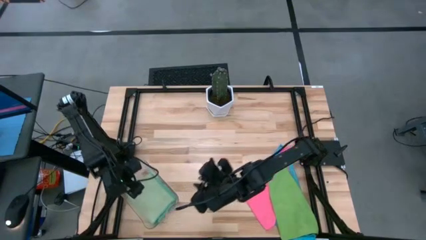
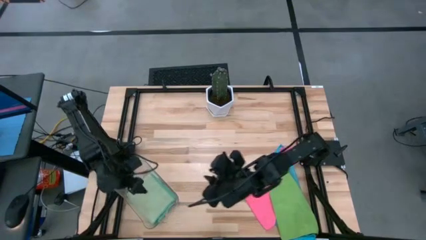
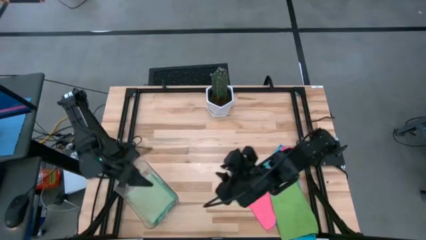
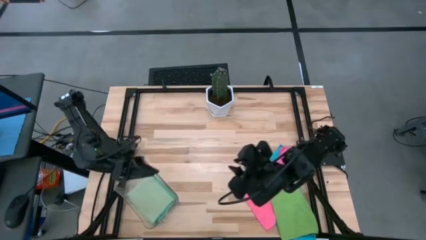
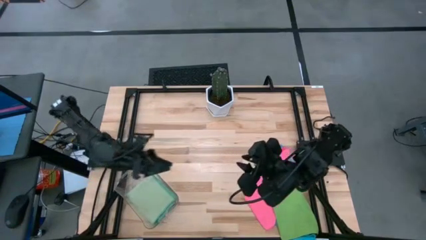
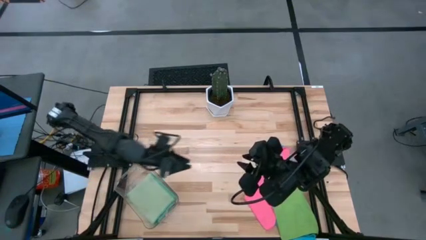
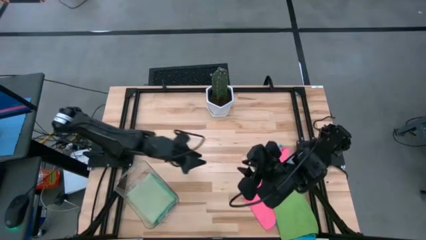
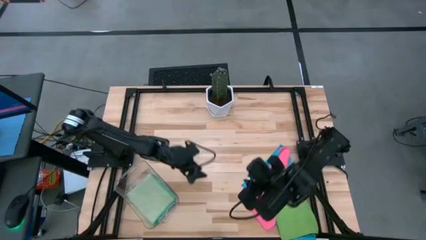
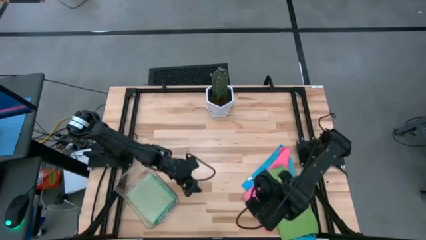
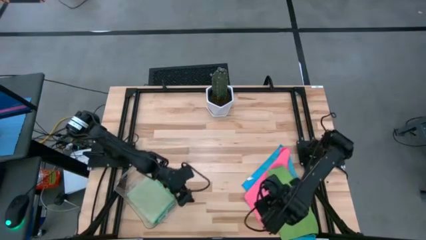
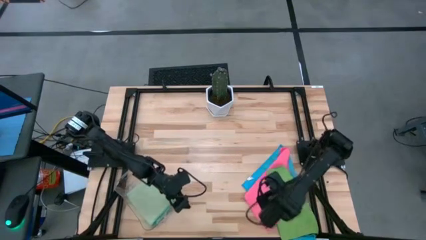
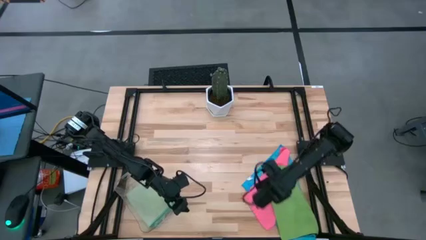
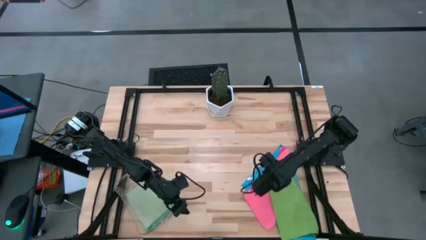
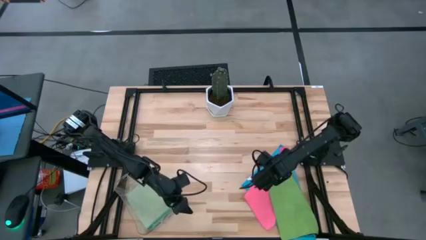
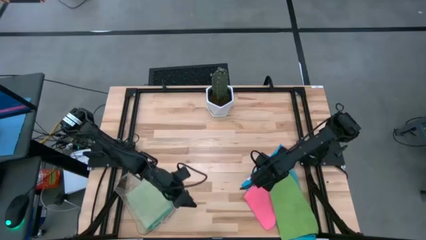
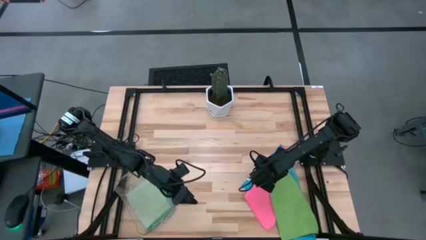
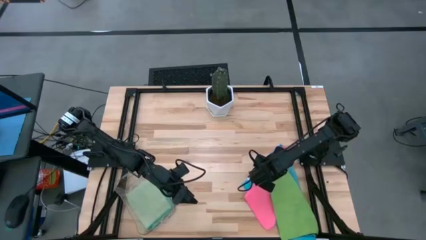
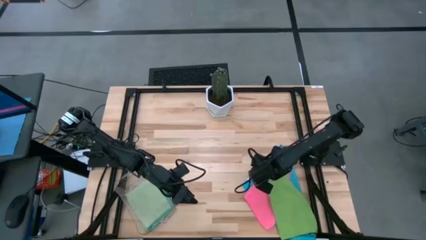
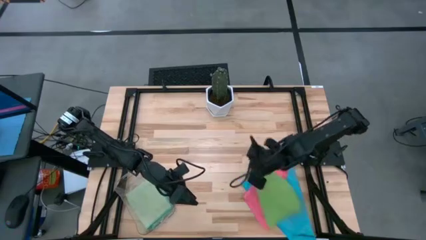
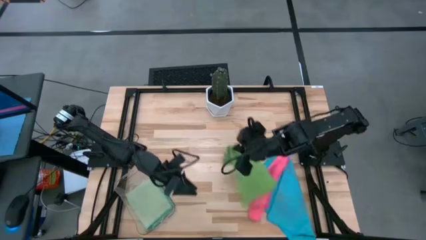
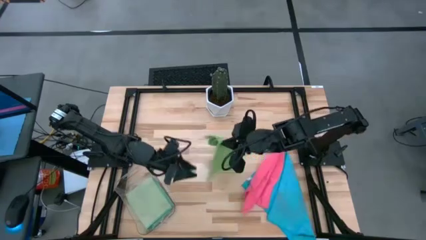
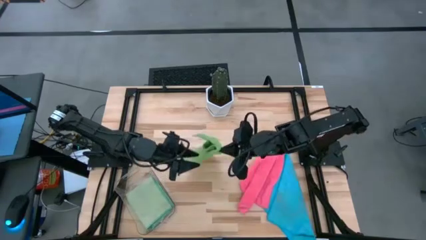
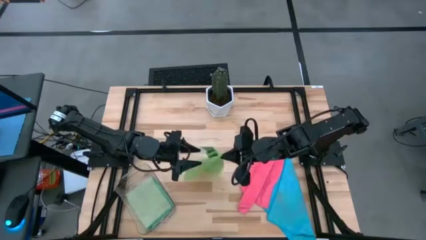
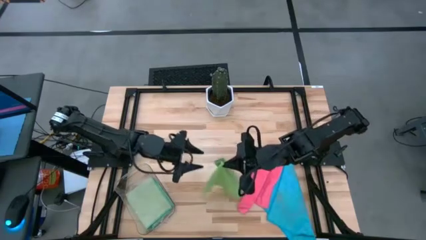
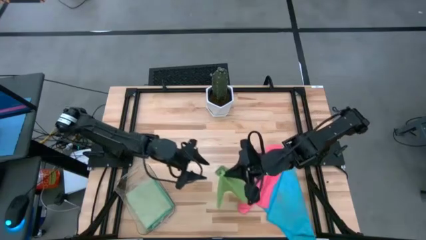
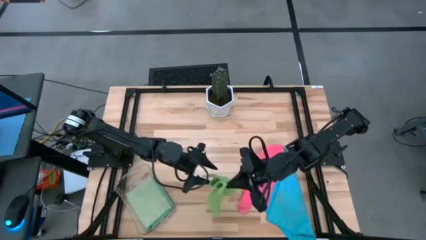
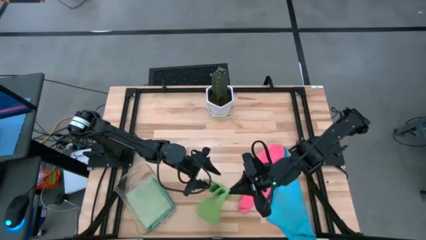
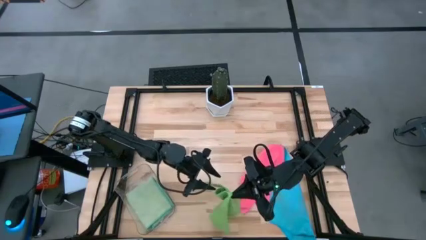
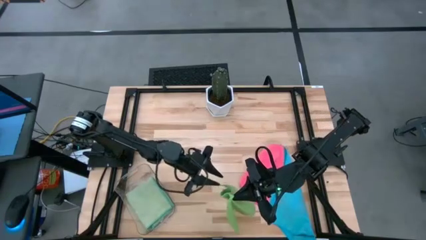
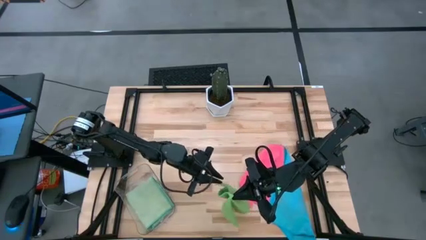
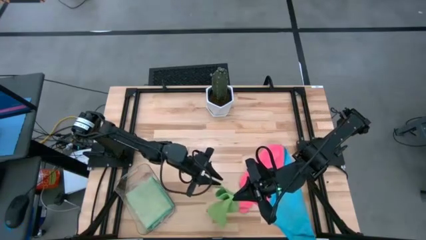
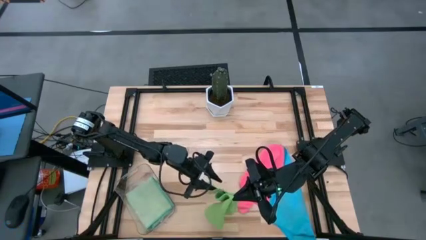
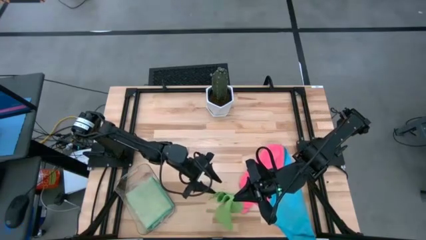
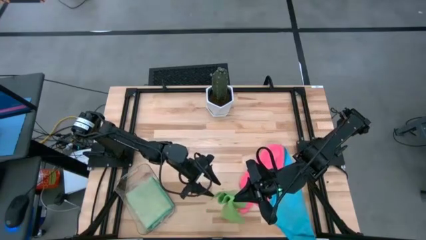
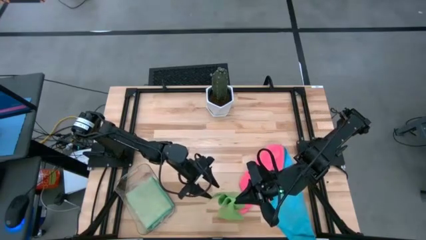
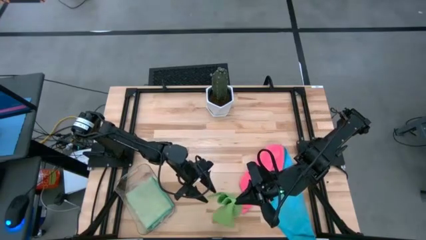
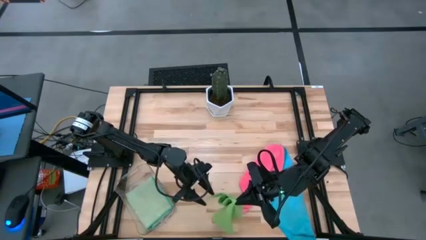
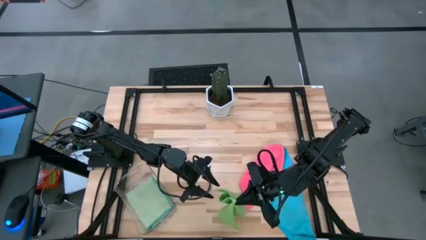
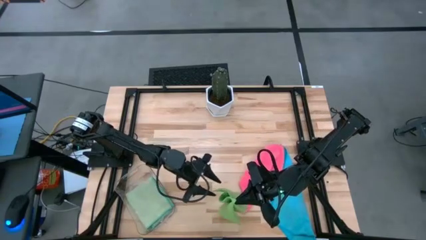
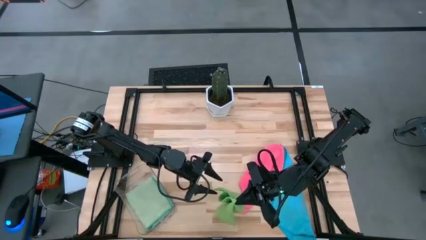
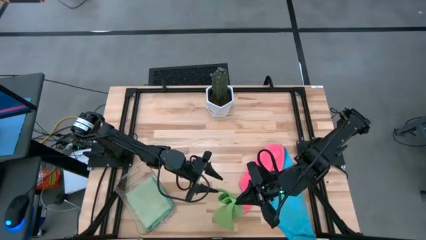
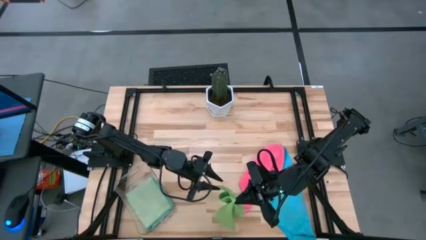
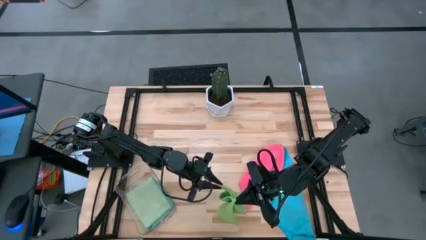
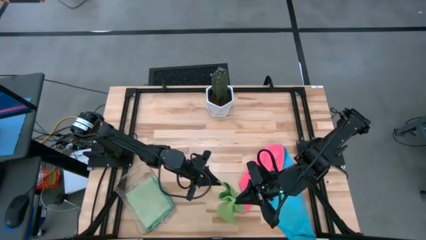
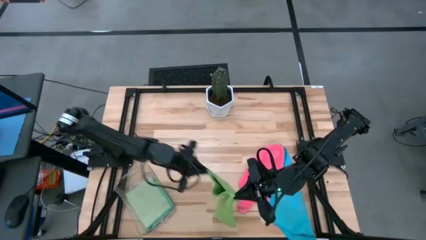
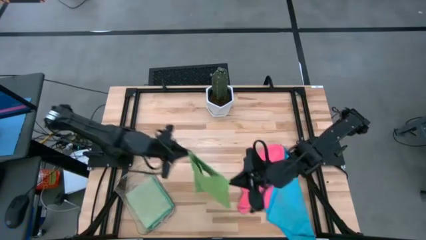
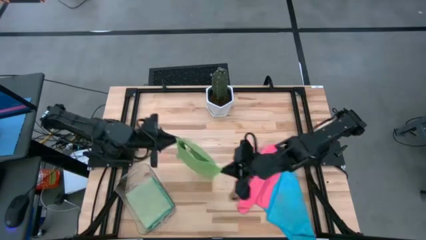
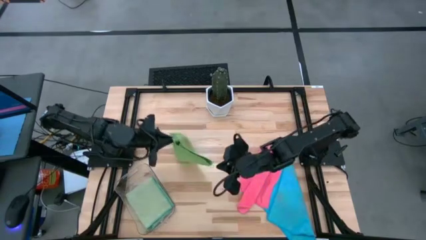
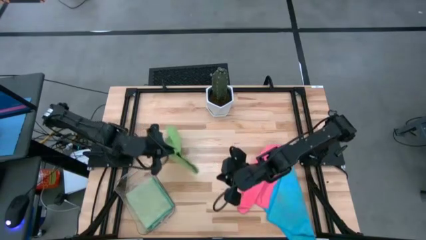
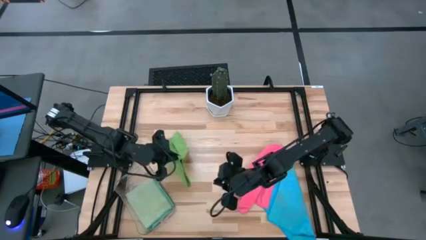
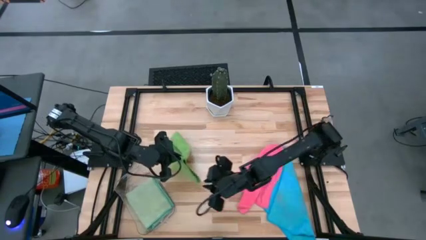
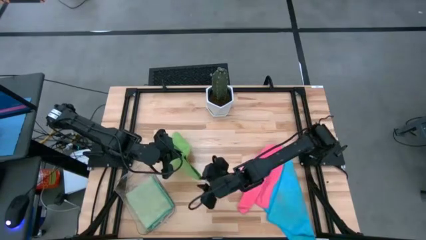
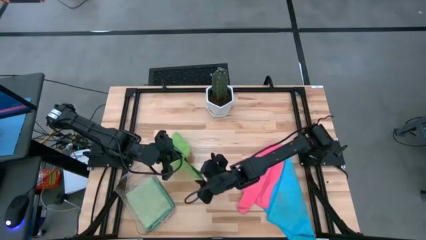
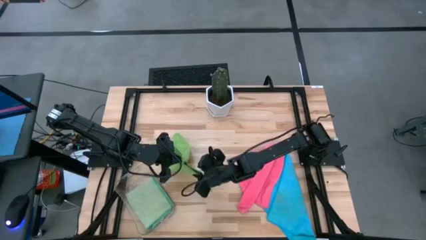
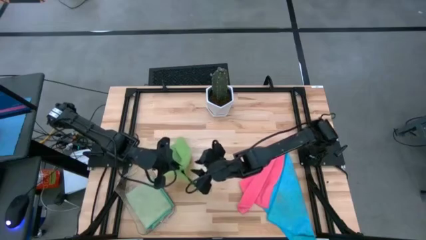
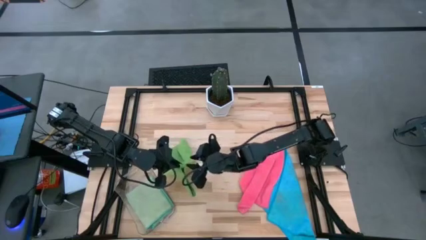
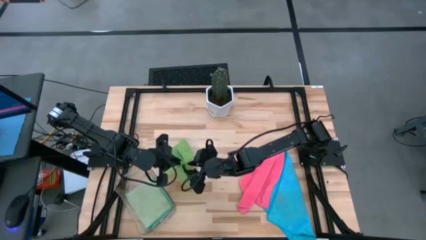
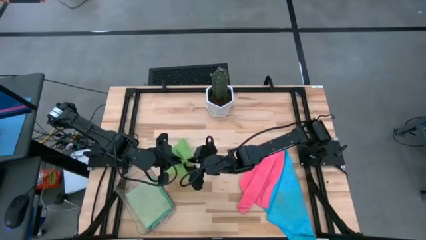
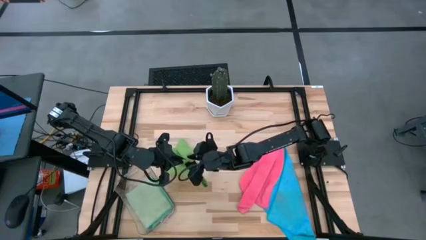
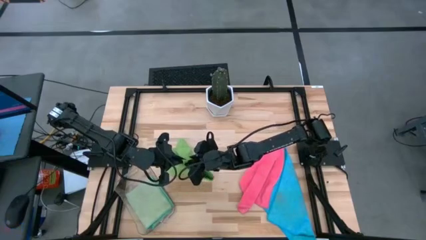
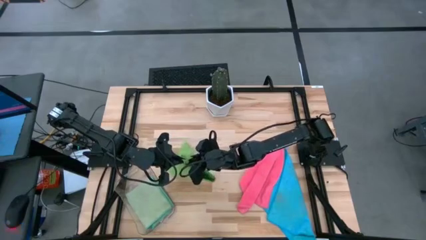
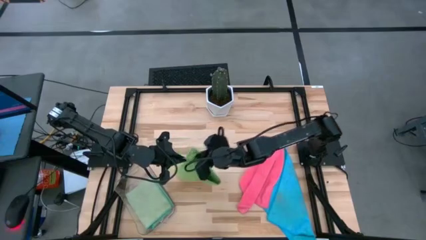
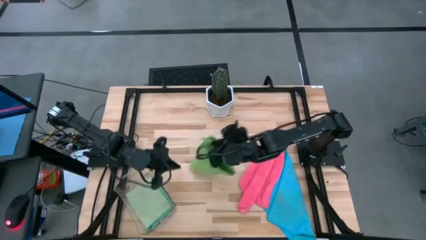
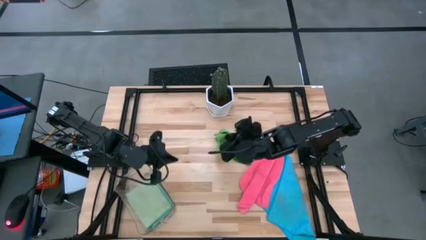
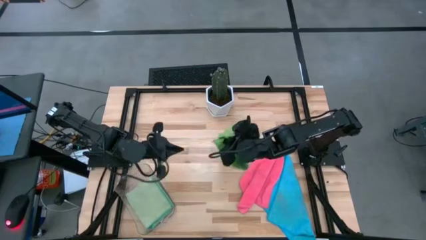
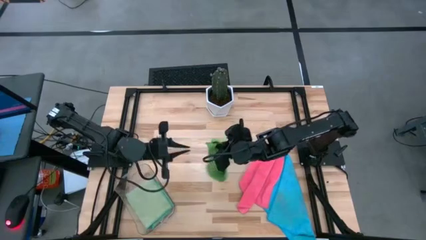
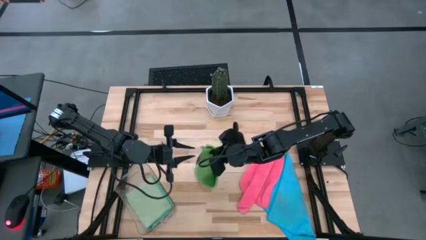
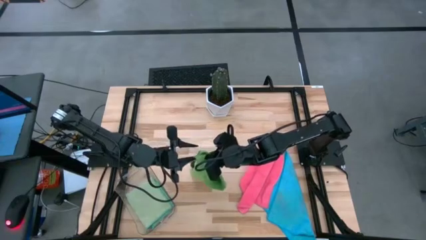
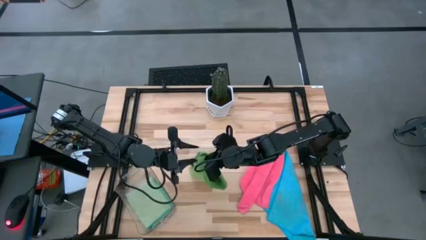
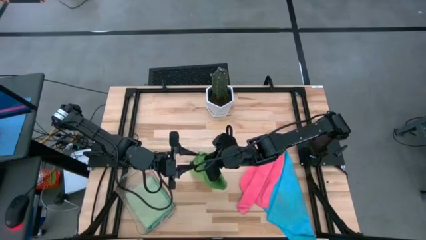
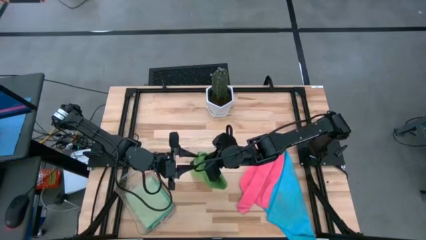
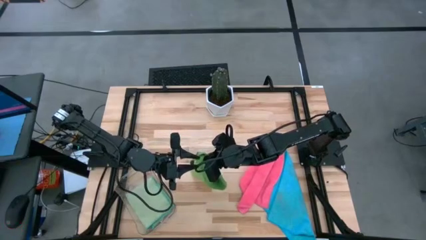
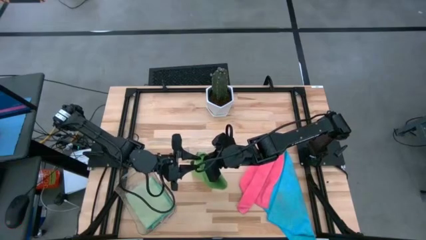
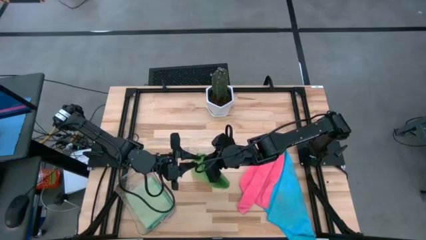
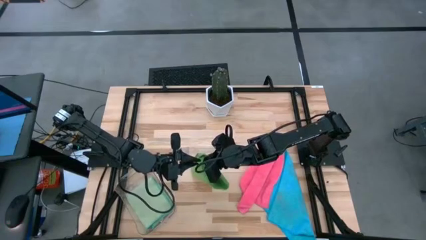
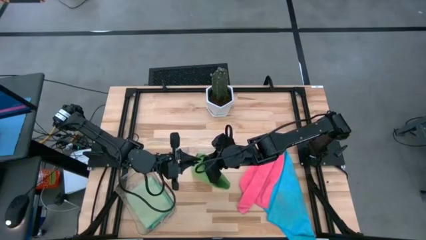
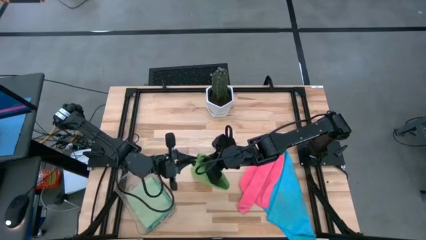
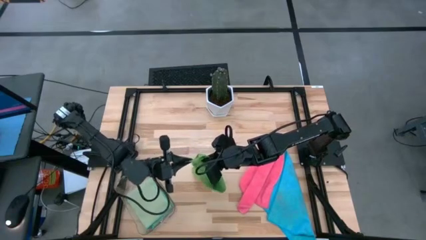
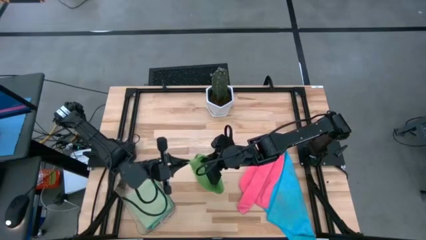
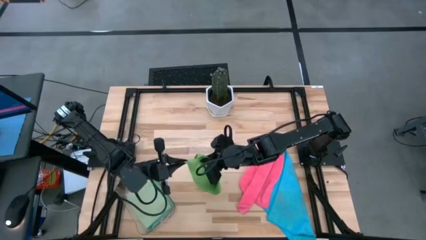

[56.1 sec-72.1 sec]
Task: Fold microfiber towels
Fold the green microfiber cloth

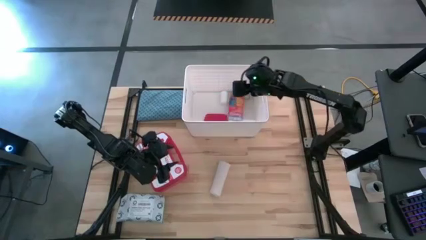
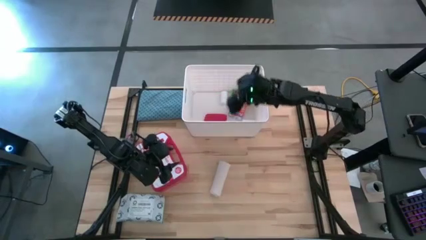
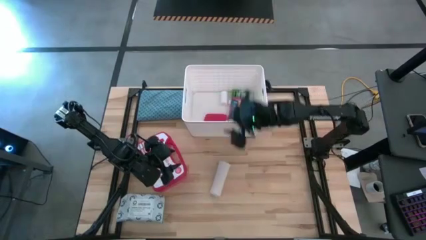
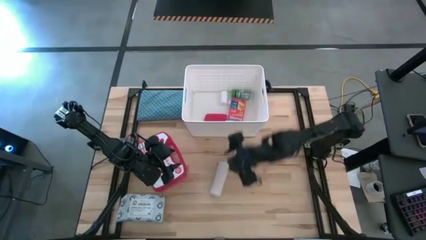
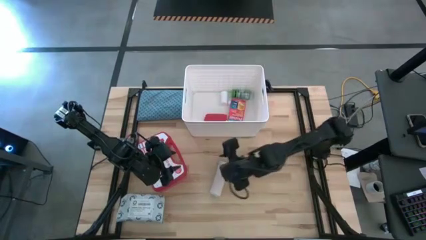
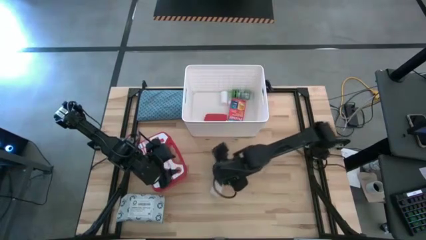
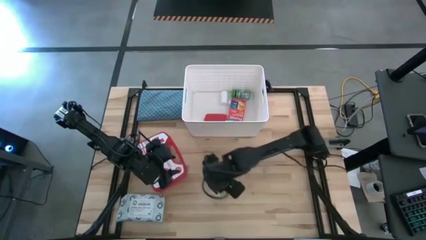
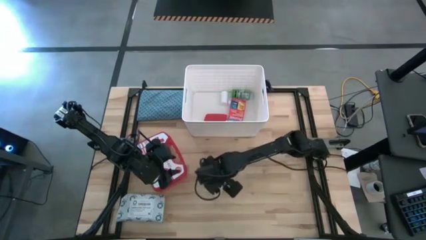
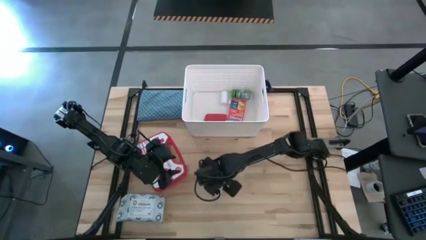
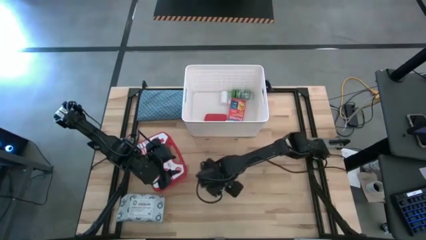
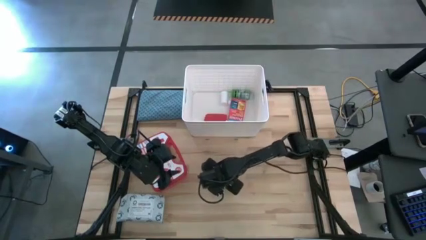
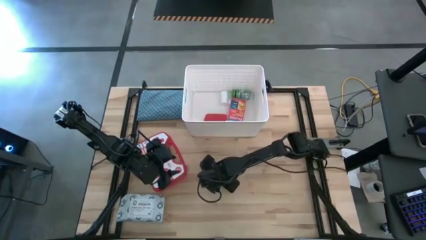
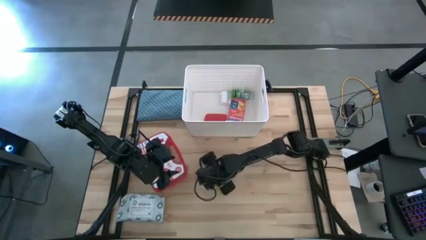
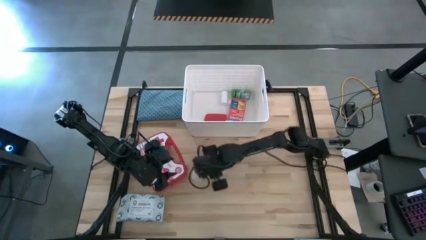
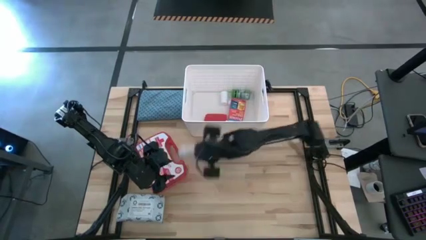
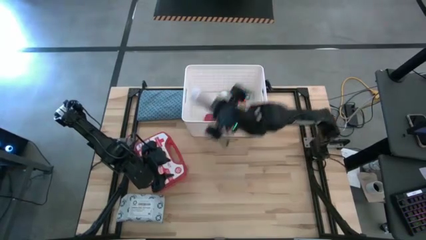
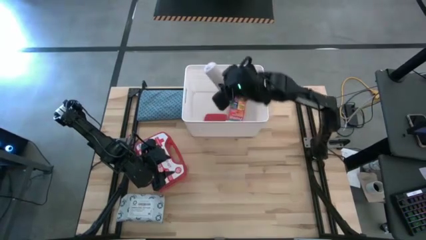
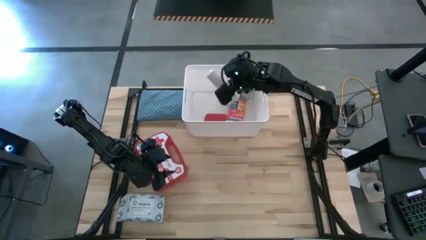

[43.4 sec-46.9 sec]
Task: Pick & place medical supplies in basket/bin
Put the white bandage in the white bin
